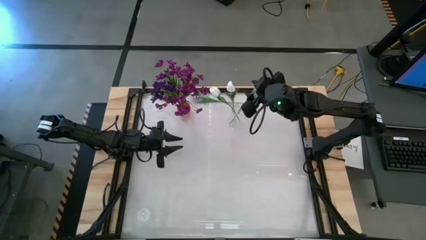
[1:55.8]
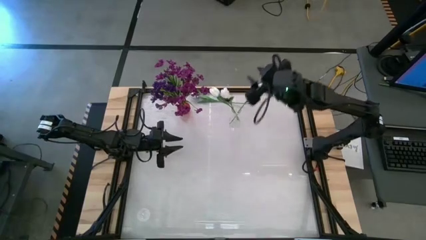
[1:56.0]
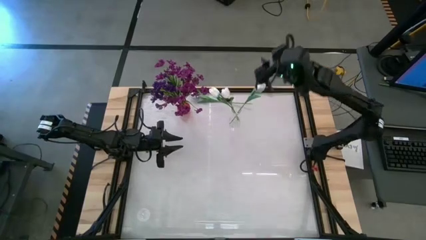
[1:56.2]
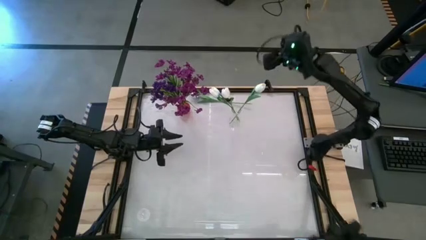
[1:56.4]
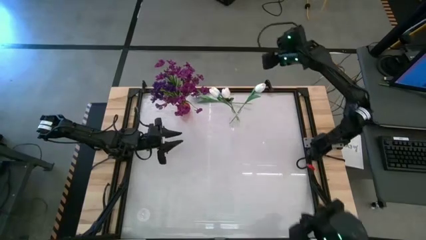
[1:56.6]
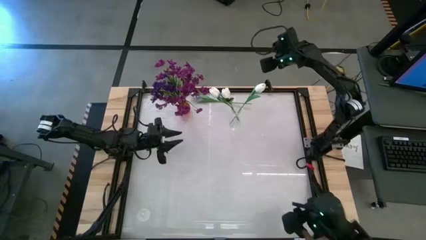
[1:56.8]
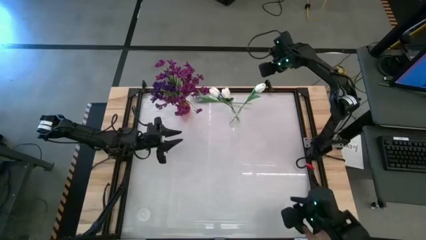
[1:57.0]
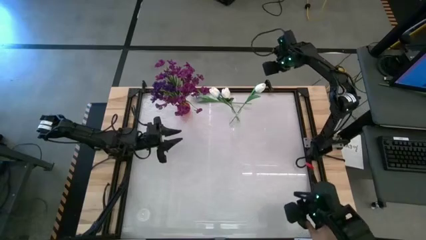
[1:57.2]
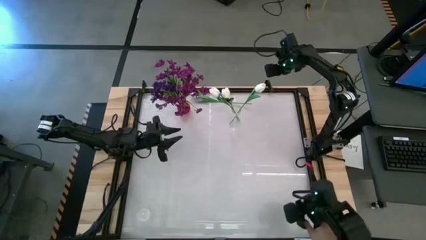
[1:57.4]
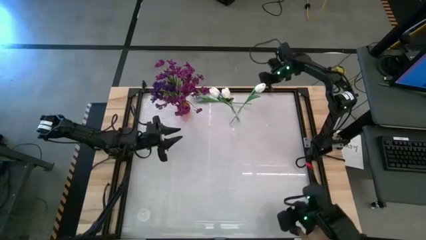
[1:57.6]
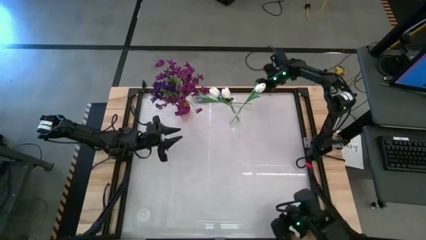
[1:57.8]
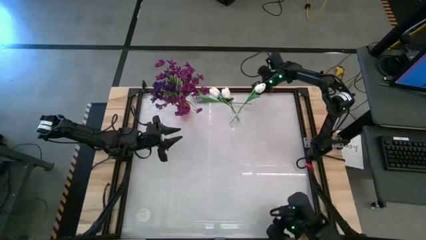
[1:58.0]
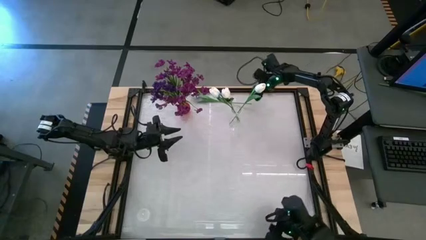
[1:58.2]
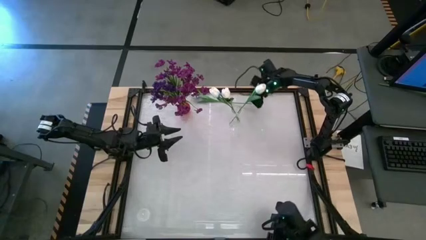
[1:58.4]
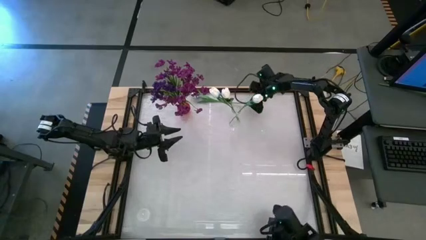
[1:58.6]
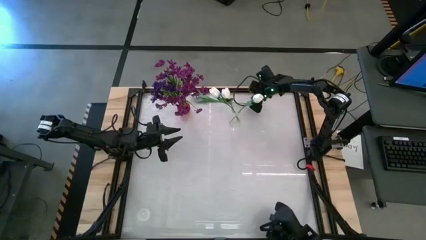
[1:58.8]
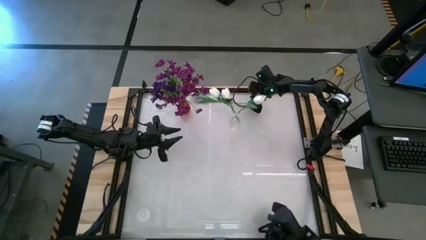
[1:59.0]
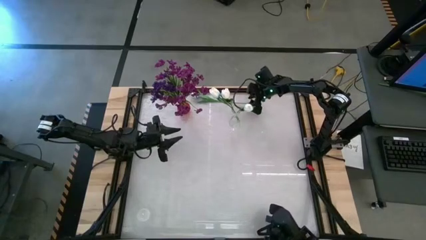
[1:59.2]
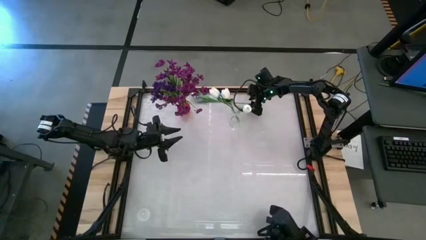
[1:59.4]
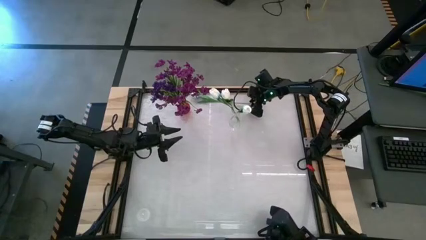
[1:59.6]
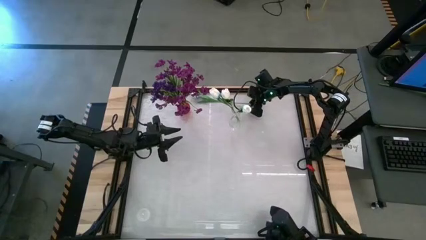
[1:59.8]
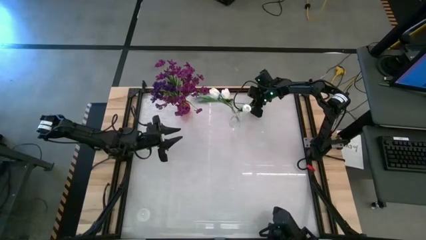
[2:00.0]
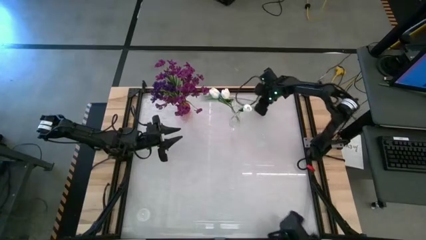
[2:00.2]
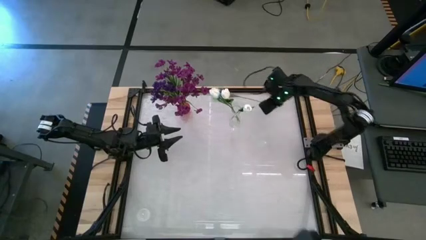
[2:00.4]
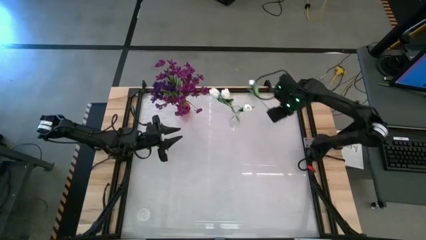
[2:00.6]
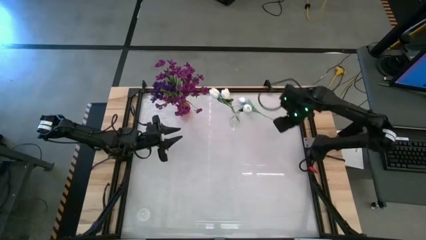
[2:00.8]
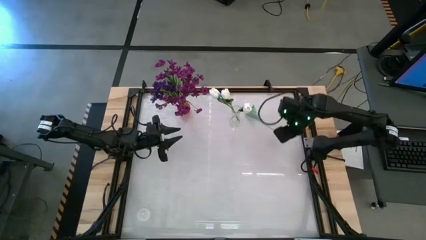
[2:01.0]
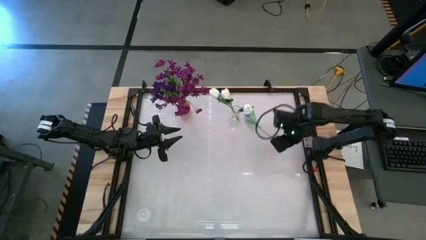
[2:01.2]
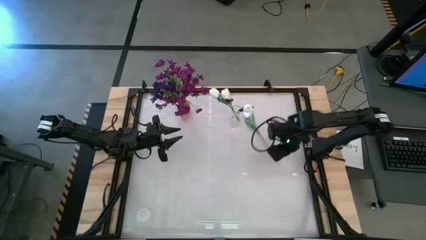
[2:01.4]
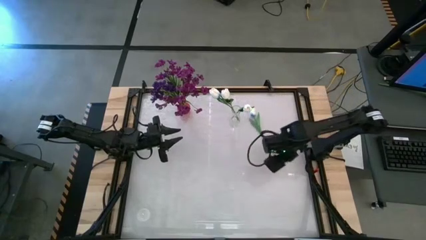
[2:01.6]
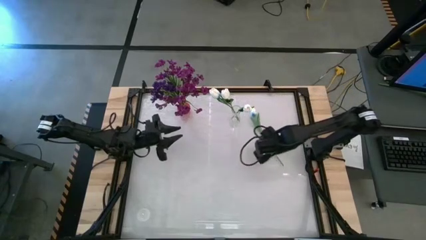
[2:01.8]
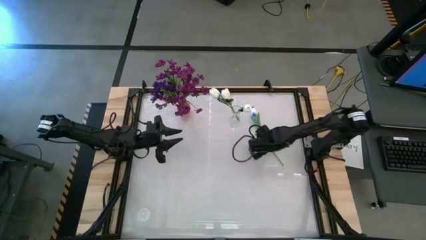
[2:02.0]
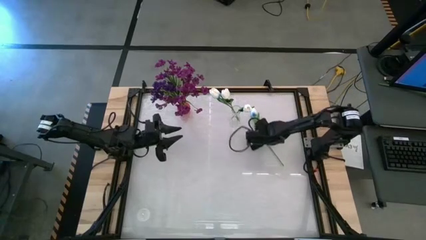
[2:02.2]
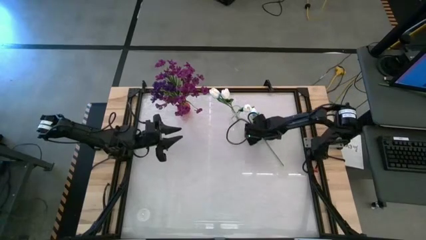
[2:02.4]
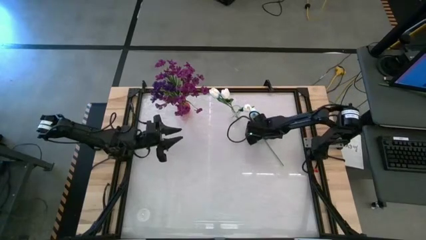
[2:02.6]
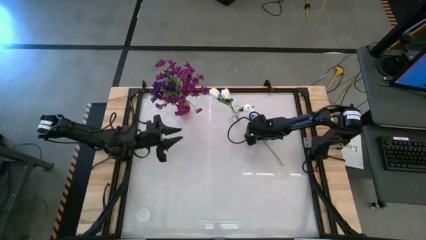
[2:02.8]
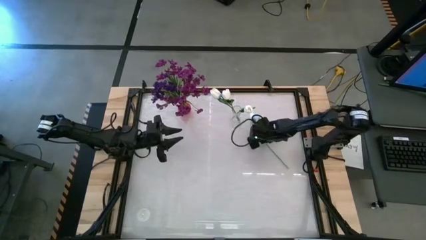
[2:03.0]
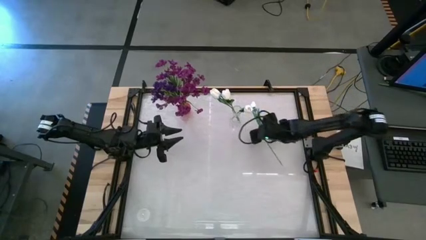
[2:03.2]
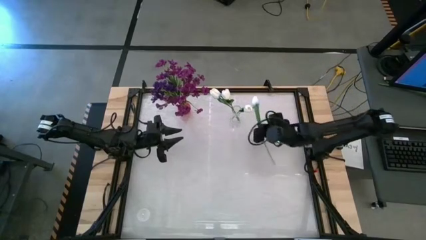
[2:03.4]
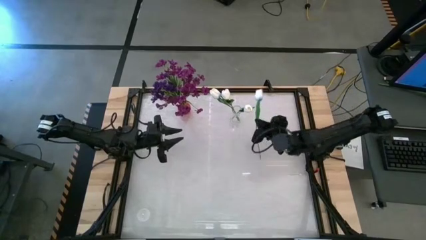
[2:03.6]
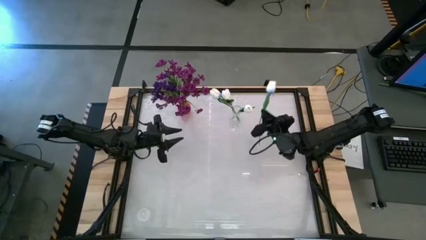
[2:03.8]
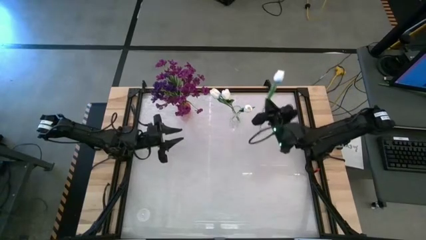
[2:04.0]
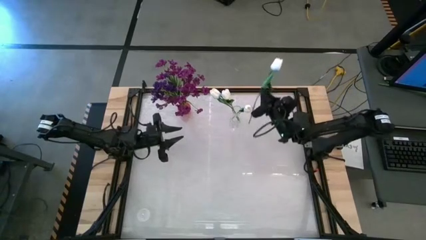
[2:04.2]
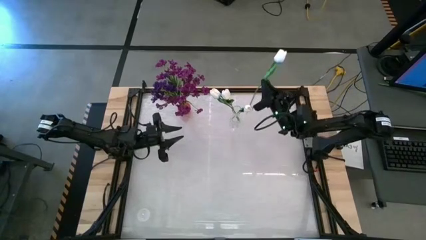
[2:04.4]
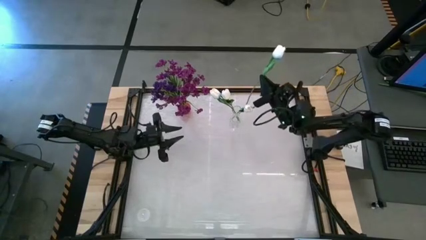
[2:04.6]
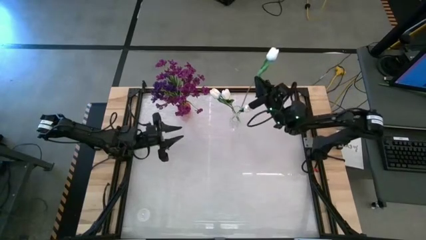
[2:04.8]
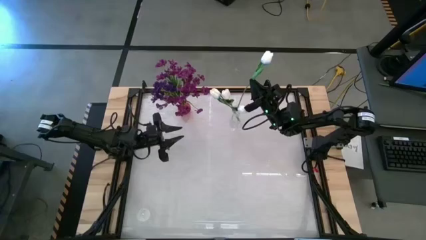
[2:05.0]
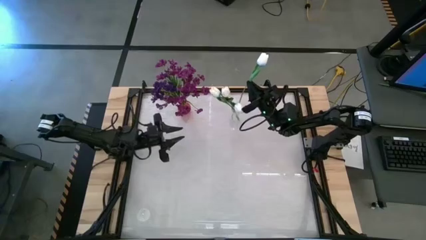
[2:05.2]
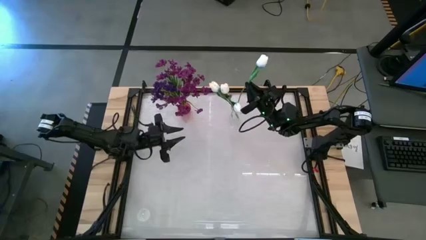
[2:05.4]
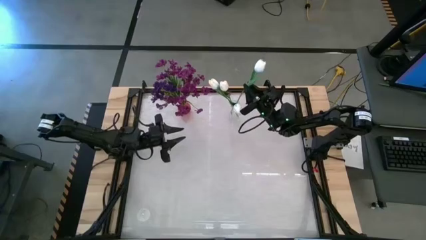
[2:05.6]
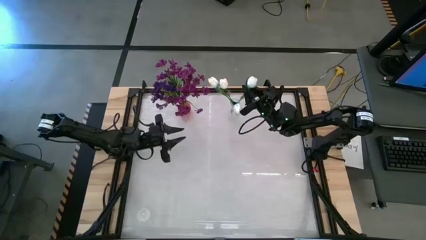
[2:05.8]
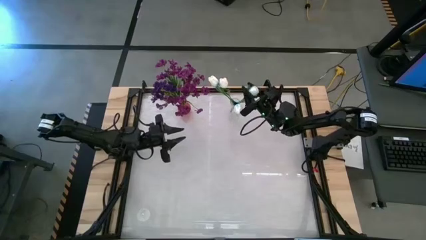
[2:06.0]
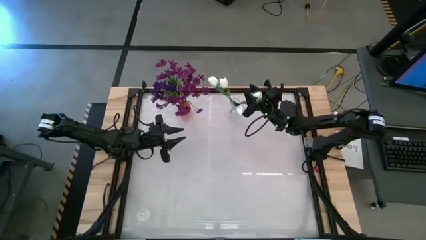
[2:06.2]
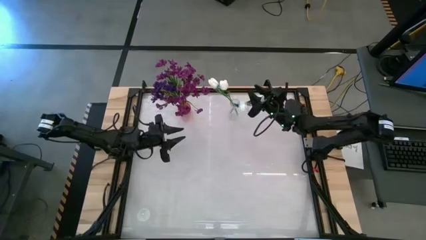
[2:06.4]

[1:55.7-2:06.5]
Task: Sort flowers into vase by color
Put the white flower into the transparent vase

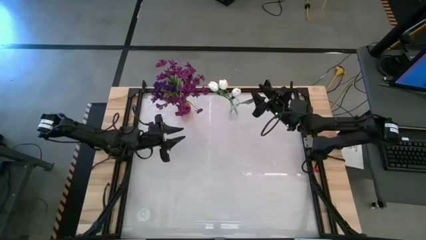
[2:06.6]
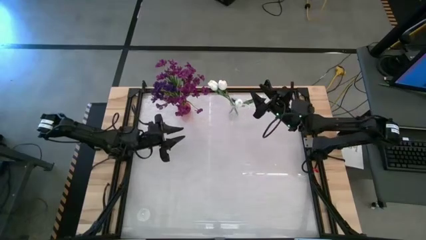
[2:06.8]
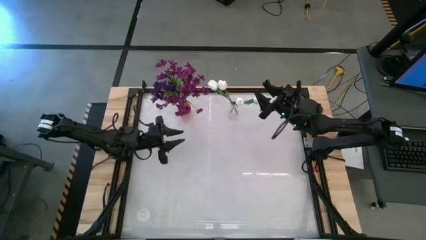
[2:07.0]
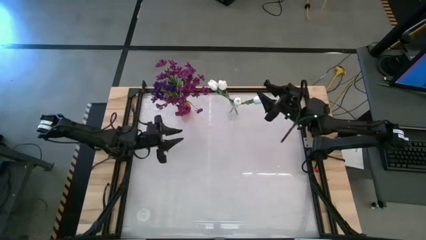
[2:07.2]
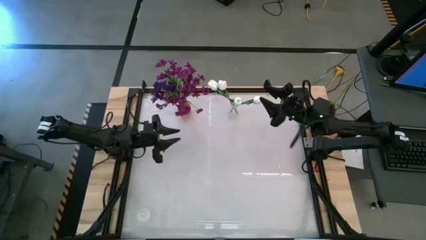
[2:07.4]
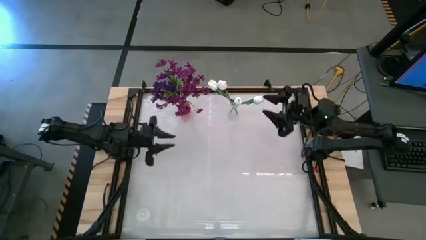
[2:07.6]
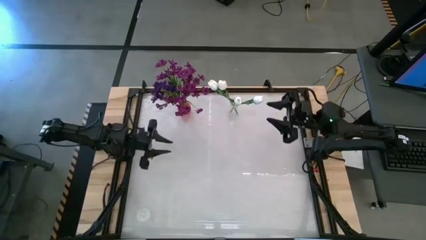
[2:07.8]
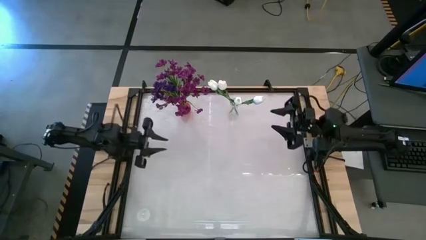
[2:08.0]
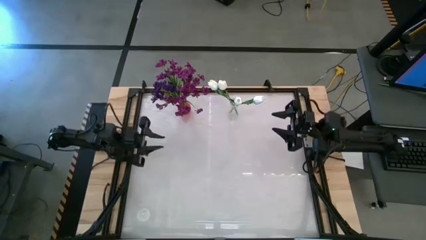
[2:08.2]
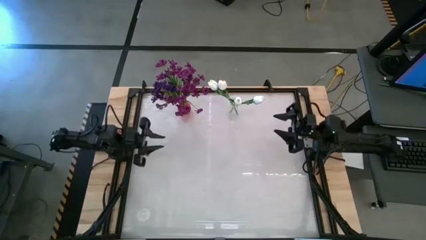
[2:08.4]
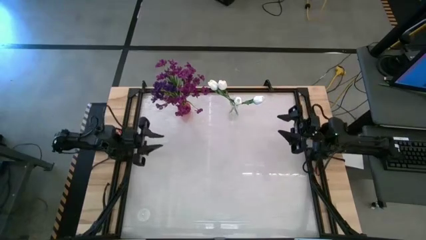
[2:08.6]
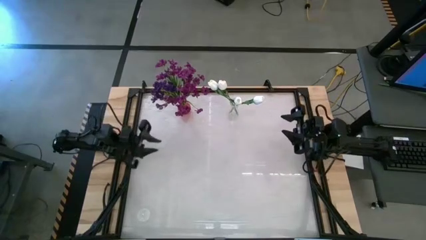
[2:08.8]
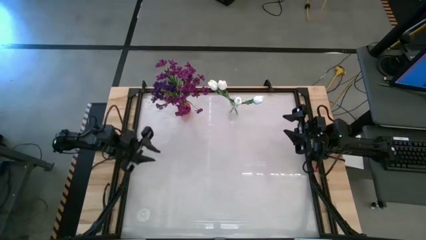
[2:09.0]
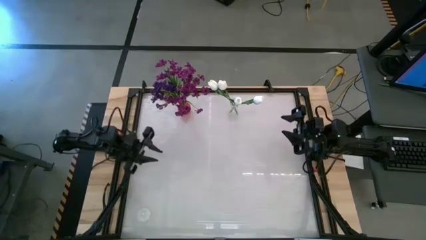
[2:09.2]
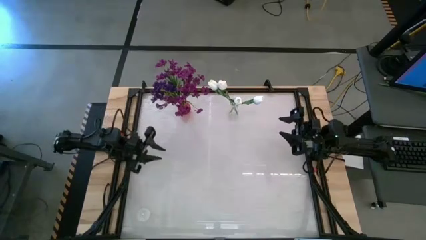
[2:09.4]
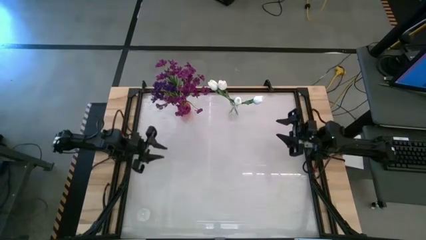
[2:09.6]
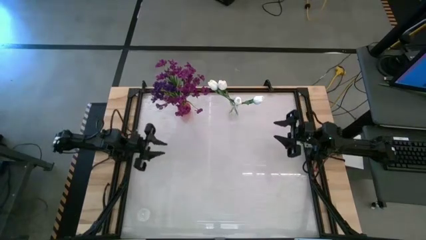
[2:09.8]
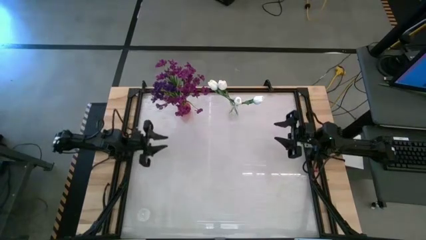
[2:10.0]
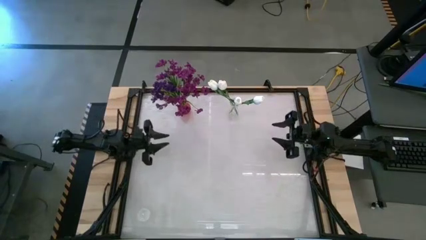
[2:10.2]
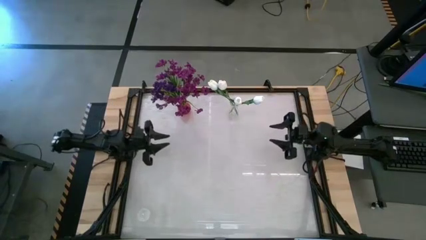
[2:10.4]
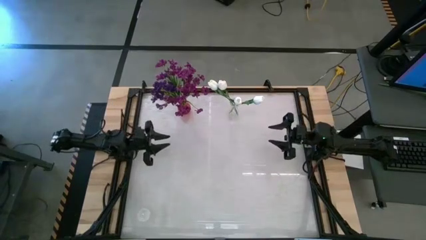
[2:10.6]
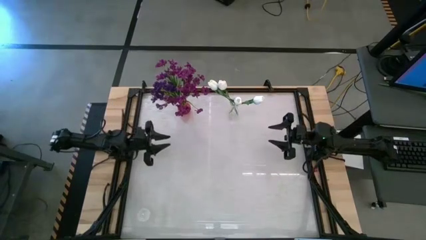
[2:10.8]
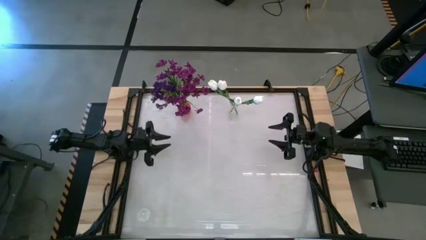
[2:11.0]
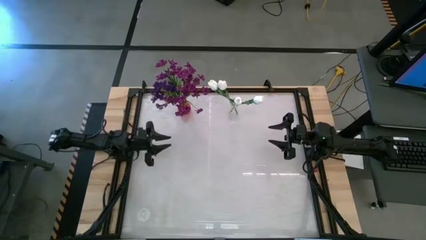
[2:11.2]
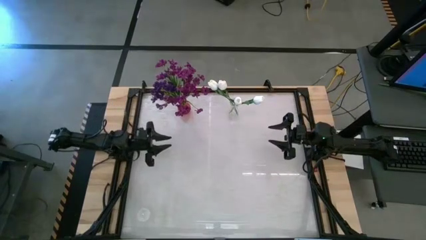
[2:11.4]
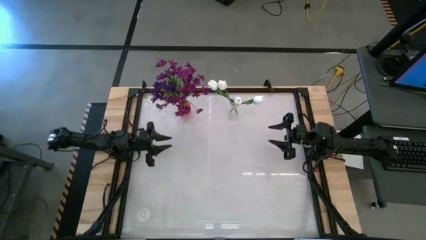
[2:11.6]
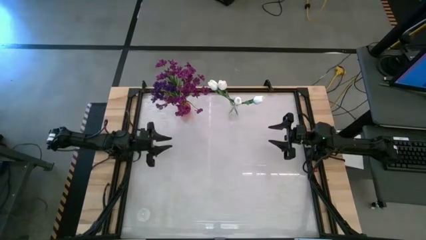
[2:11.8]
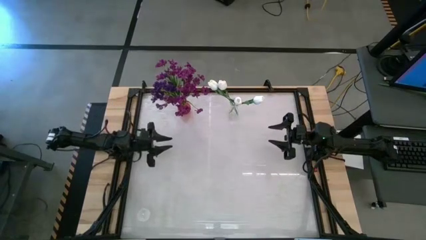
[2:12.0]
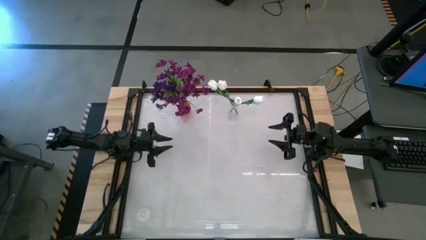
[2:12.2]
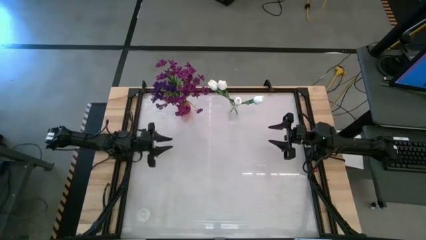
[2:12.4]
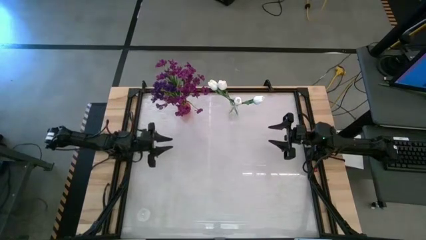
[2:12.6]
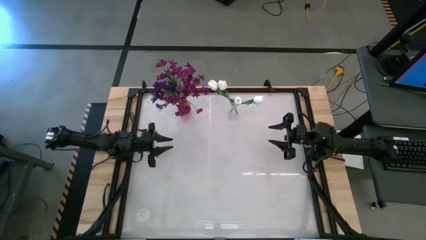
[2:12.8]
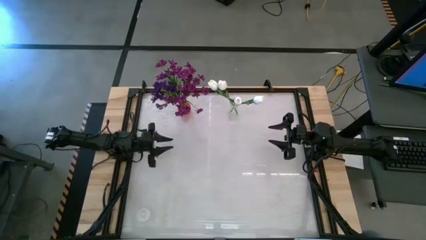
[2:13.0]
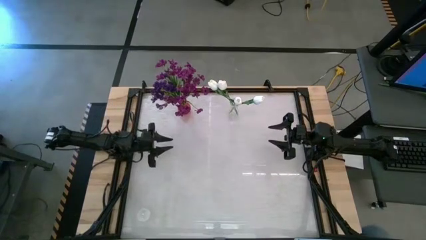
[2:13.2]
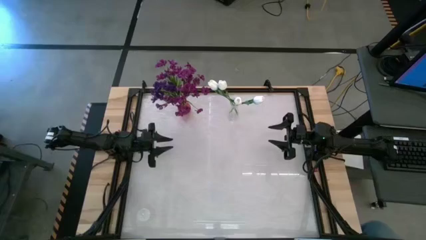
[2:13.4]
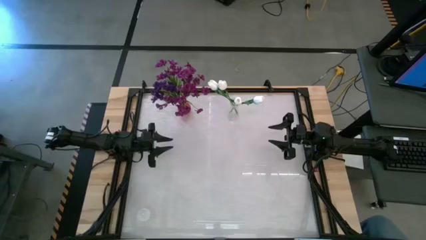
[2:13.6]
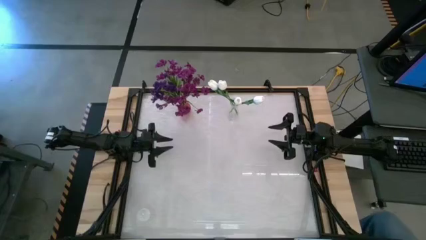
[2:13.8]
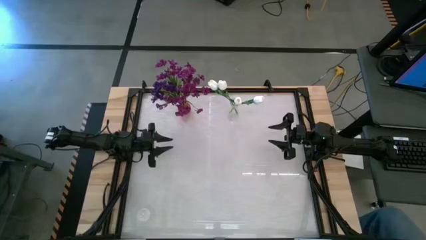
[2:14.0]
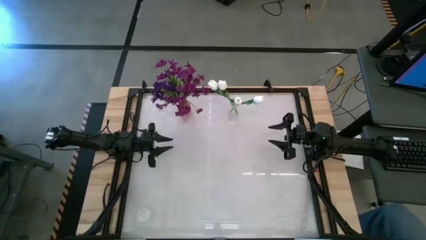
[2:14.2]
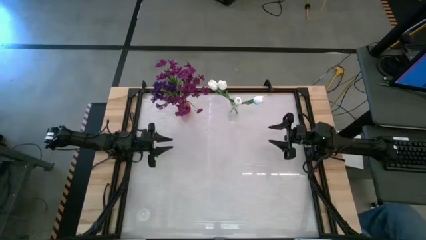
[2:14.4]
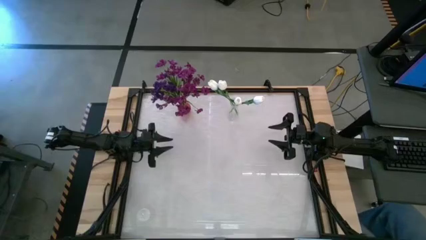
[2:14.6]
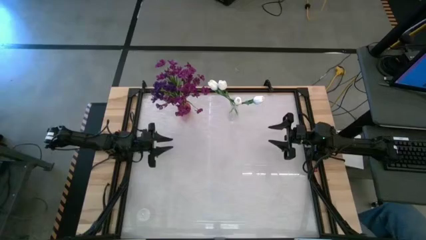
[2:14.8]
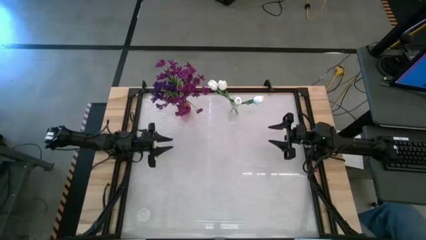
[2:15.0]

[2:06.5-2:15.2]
Return to Home Position
